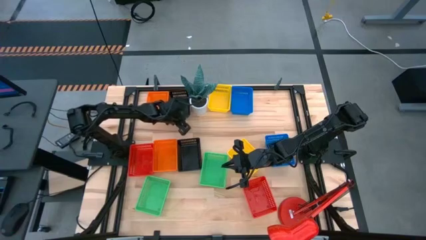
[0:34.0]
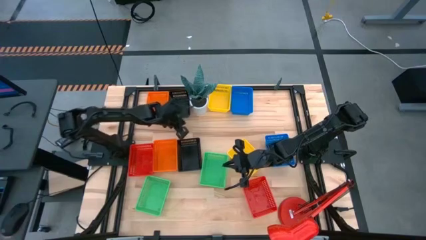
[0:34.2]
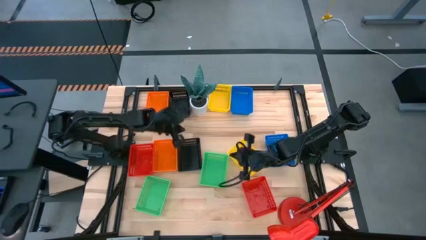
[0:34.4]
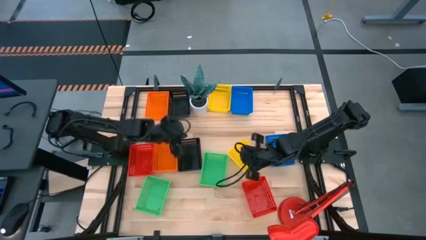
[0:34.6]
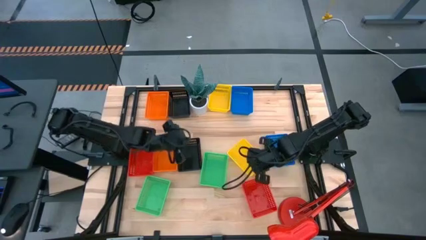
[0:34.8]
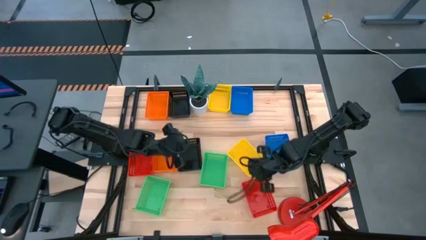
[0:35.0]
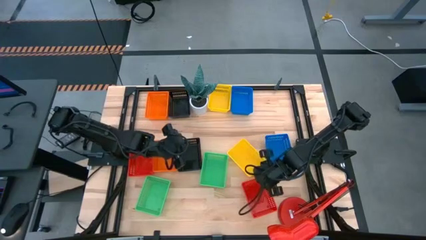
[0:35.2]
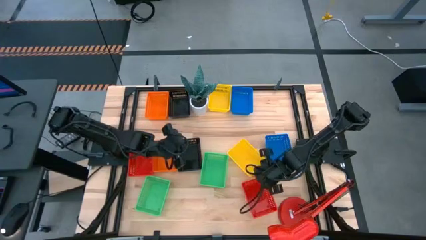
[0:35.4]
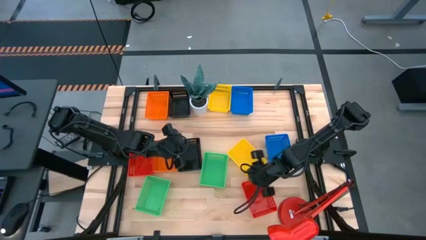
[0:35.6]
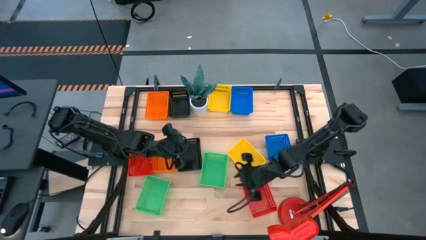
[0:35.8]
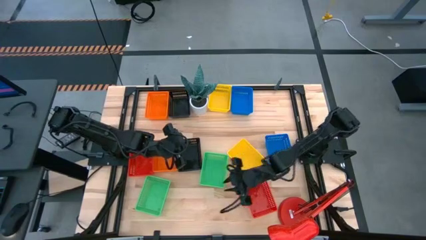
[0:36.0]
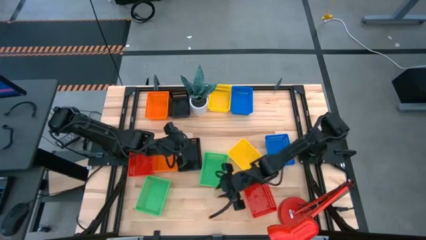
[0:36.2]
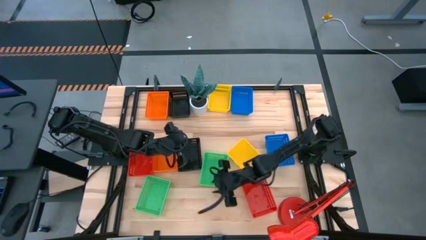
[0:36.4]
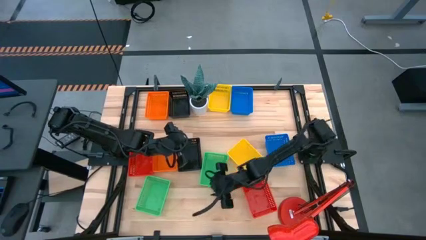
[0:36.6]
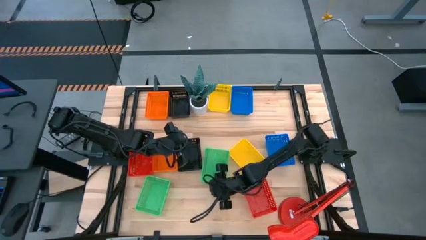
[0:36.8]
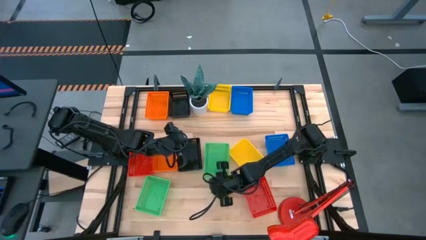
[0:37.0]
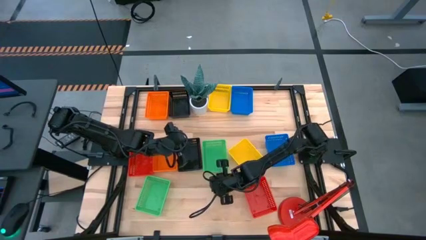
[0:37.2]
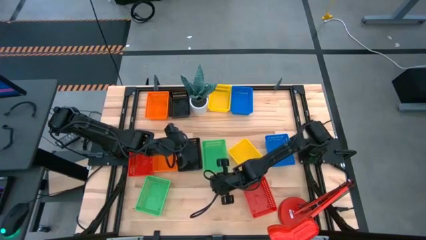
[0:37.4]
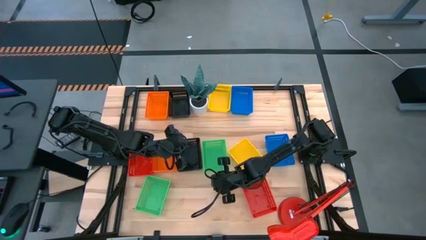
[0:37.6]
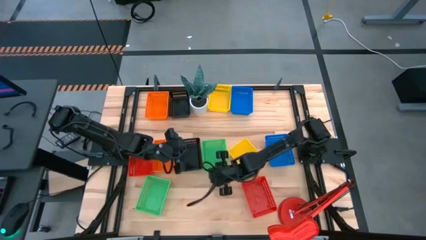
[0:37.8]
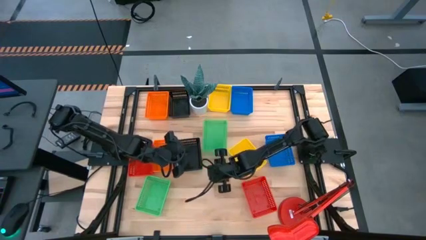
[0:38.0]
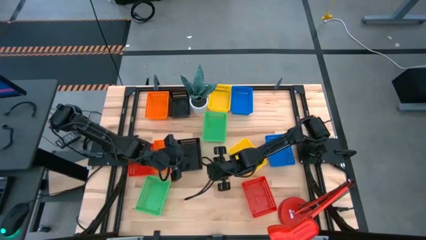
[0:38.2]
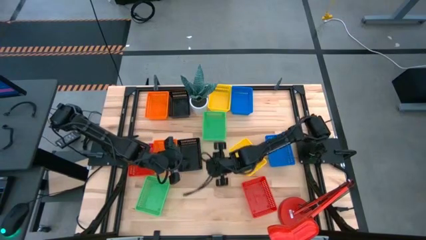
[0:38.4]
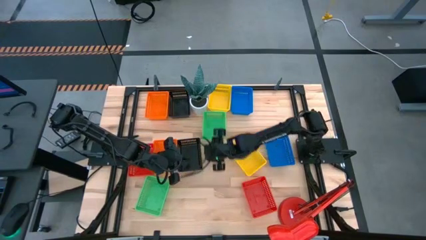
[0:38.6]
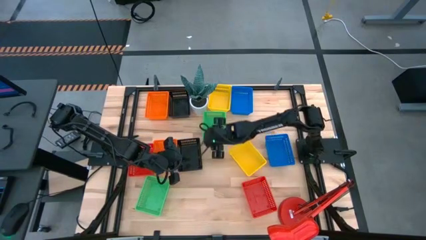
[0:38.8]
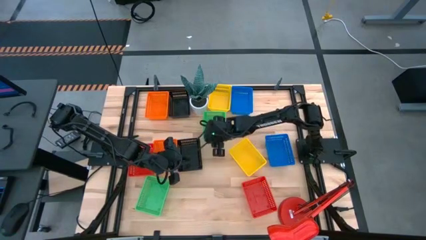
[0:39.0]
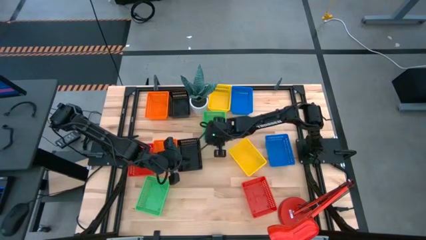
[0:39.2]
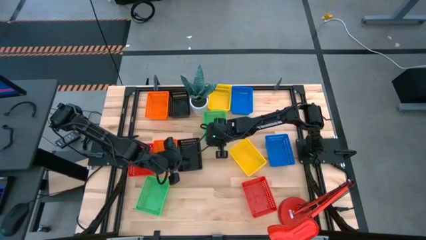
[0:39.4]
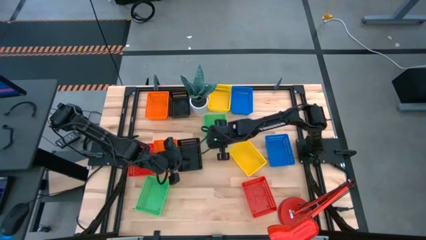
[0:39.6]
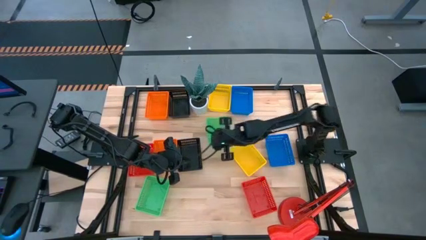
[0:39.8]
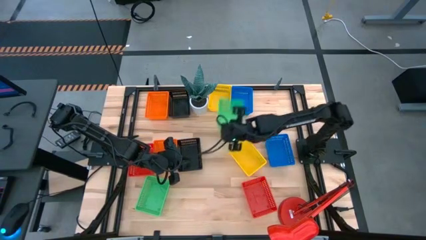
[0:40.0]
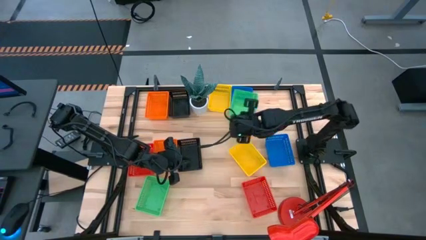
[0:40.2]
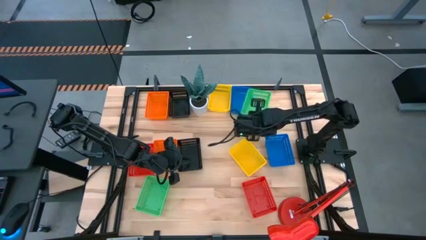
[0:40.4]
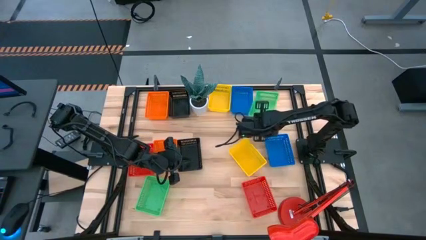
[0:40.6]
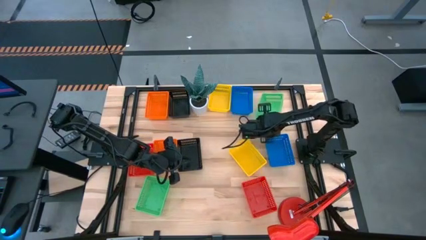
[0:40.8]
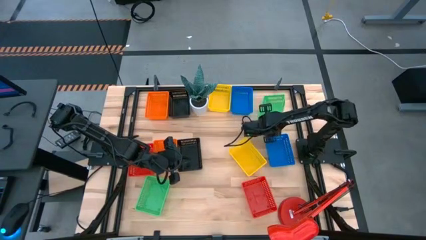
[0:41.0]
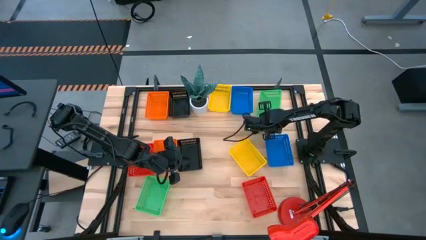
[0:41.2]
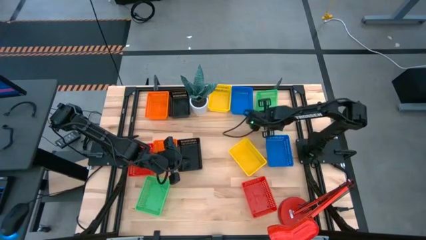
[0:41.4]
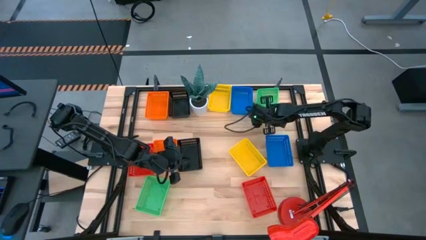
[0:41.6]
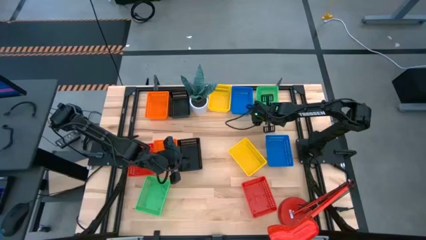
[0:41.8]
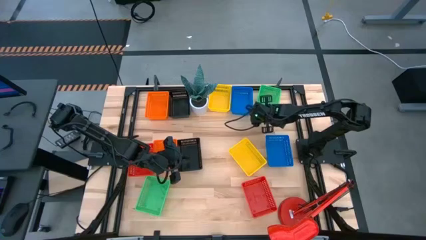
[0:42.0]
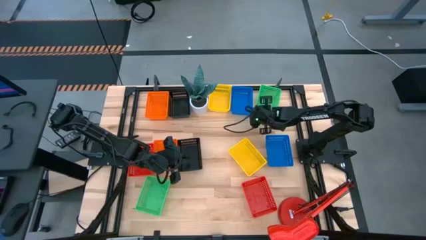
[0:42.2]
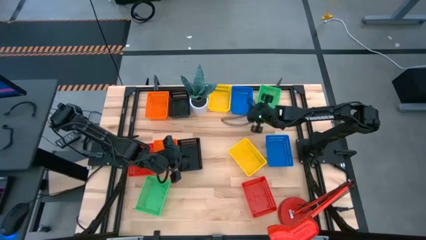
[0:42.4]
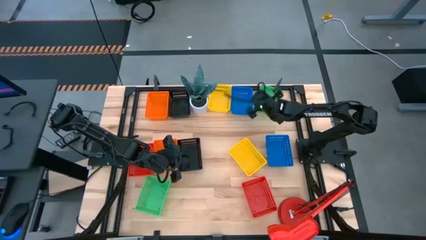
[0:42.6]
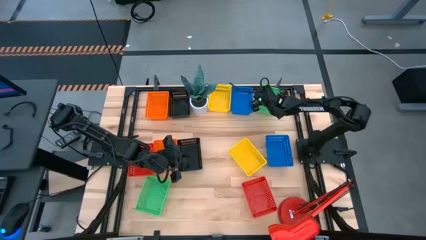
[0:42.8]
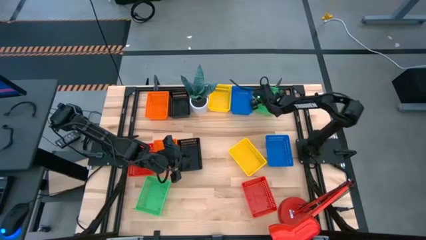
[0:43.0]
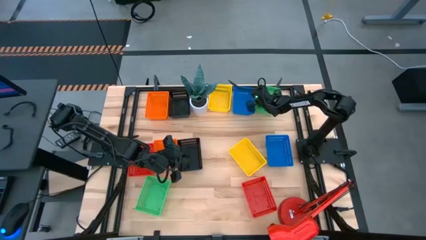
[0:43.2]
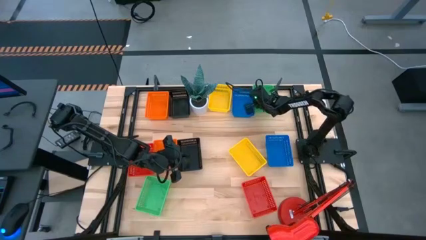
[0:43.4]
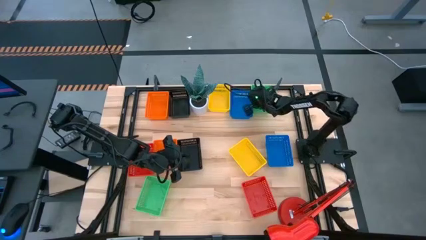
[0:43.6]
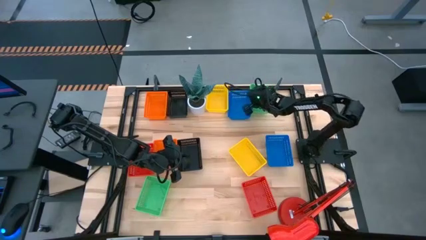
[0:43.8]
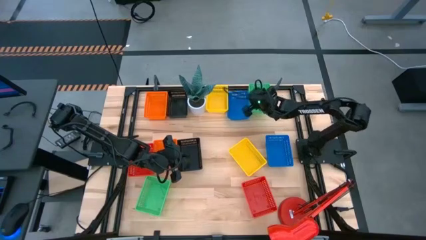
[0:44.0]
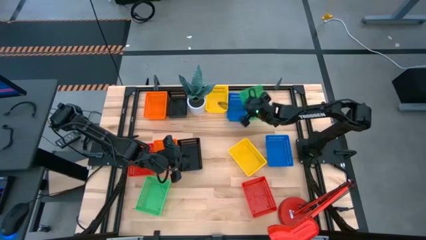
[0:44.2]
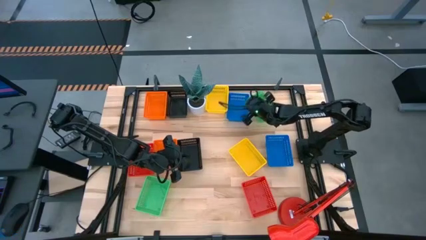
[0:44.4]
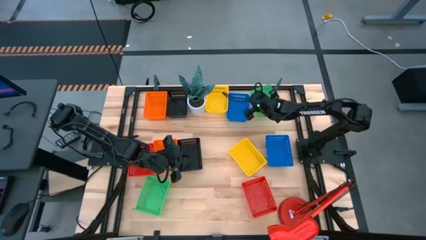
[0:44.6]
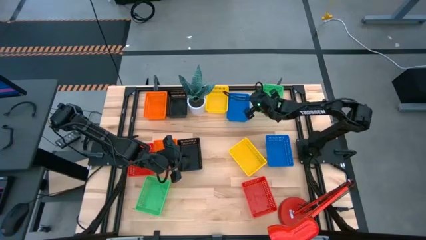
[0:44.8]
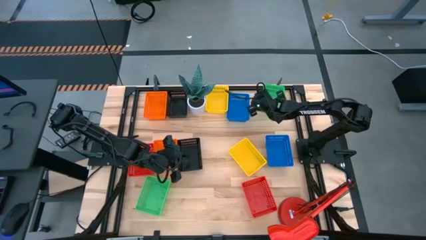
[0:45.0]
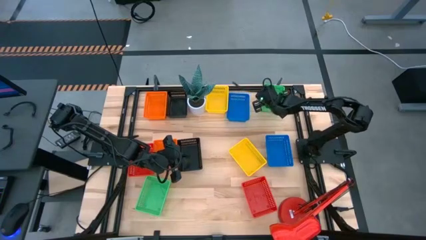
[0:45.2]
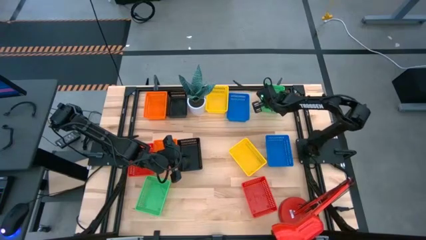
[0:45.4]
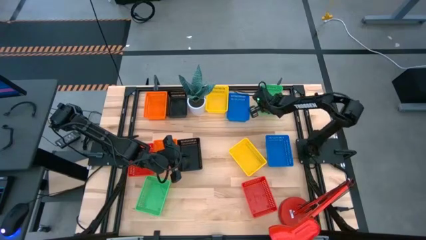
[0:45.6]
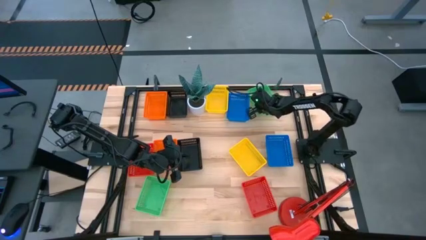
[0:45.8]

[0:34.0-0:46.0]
Move the right green bin to the top right of the table

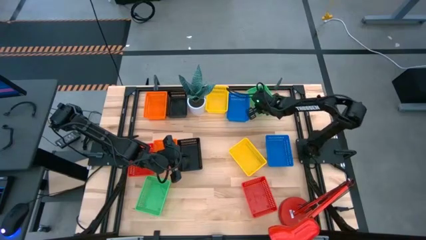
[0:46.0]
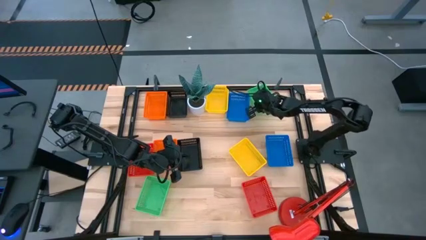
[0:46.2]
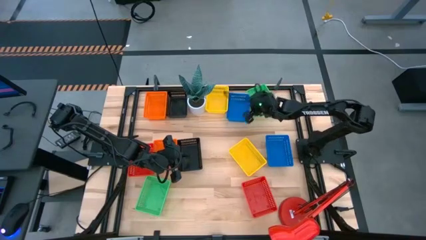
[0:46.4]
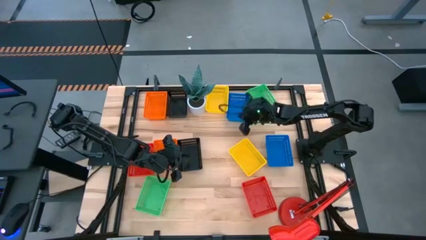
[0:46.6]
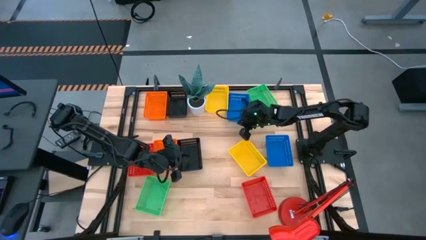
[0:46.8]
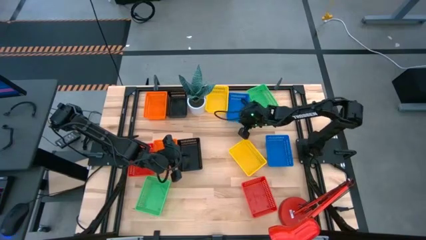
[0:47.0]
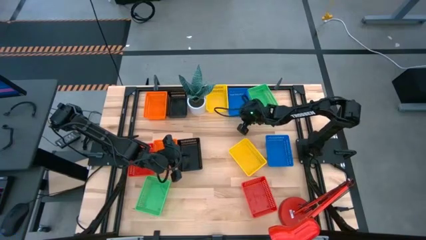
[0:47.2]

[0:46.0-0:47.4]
Adjust the top blue bin

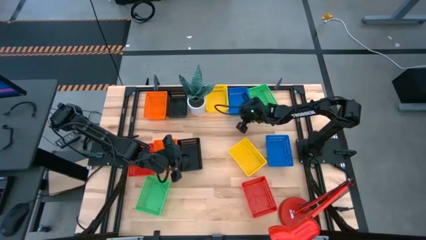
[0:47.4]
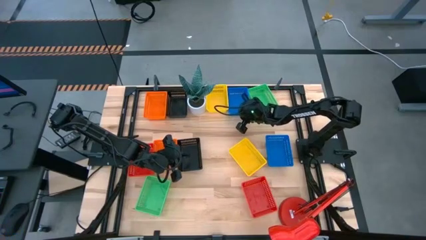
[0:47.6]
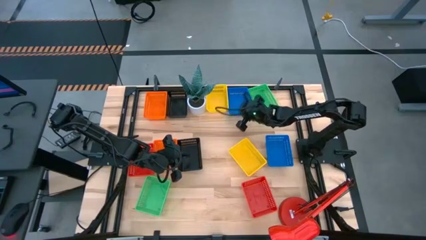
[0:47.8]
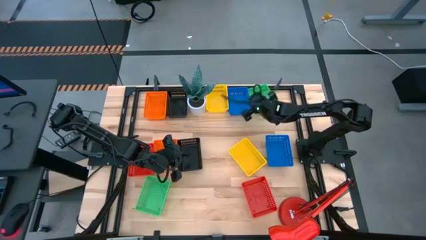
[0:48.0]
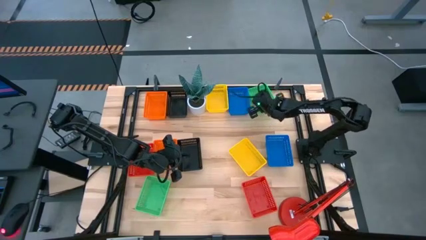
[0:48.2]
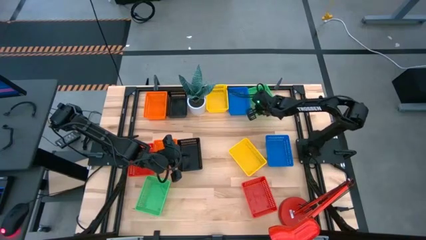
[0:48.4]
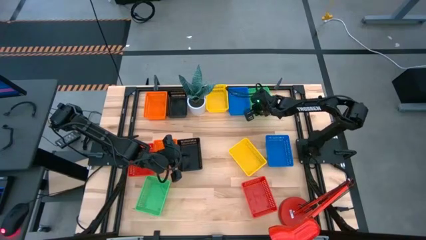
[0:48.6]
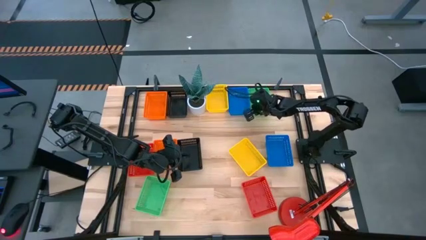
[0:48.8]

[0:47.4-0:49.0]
Adjust the top green bin
